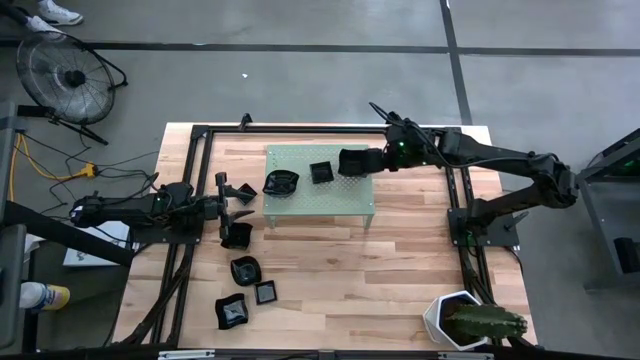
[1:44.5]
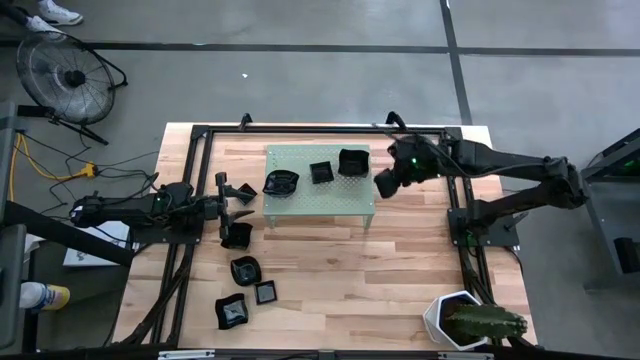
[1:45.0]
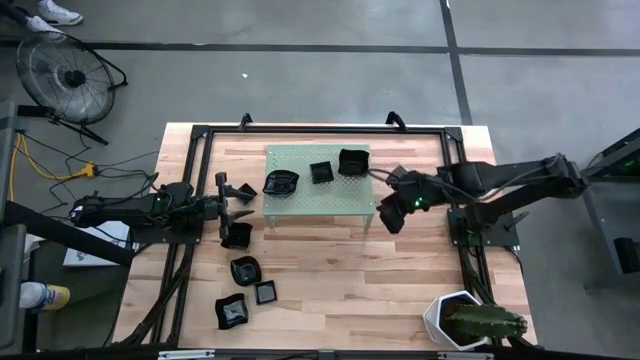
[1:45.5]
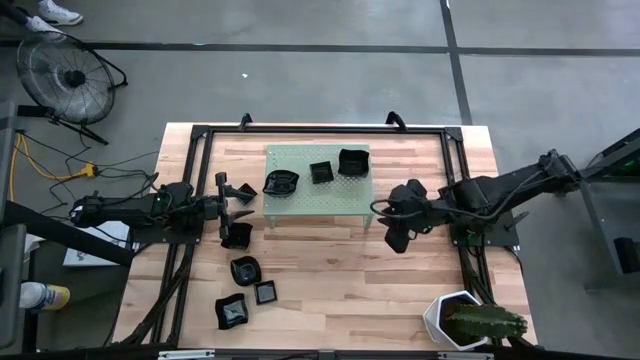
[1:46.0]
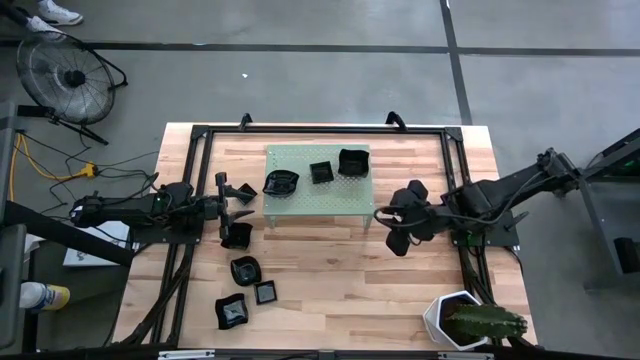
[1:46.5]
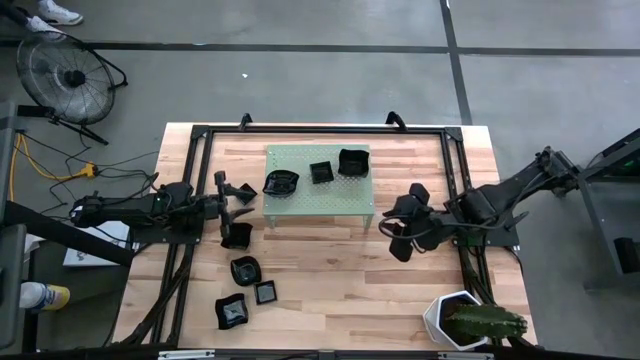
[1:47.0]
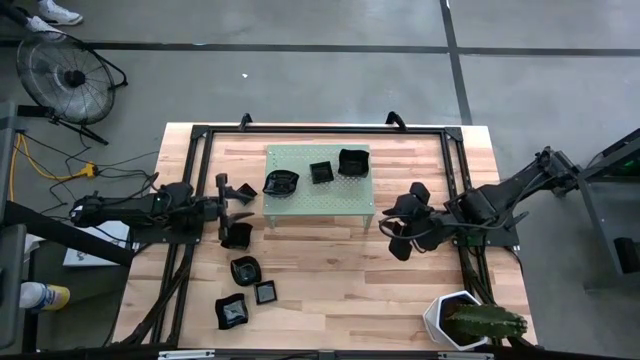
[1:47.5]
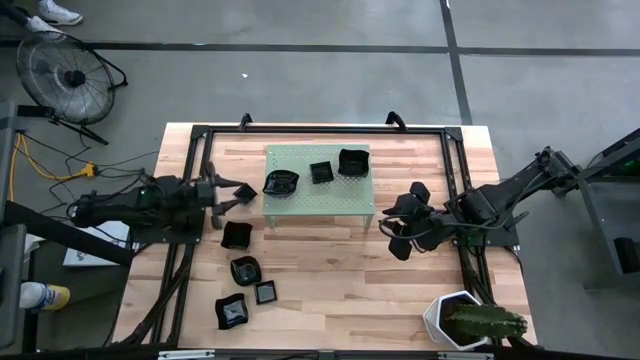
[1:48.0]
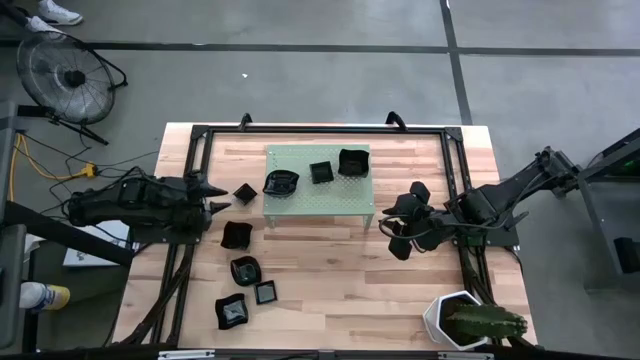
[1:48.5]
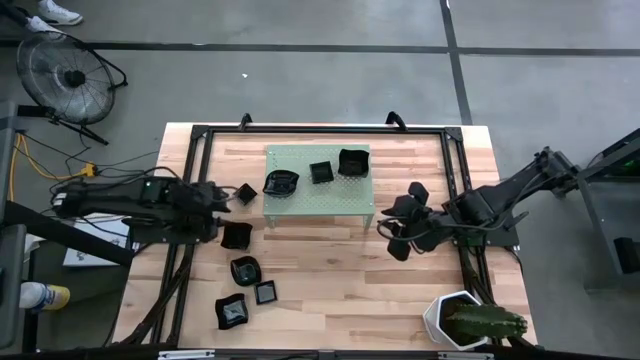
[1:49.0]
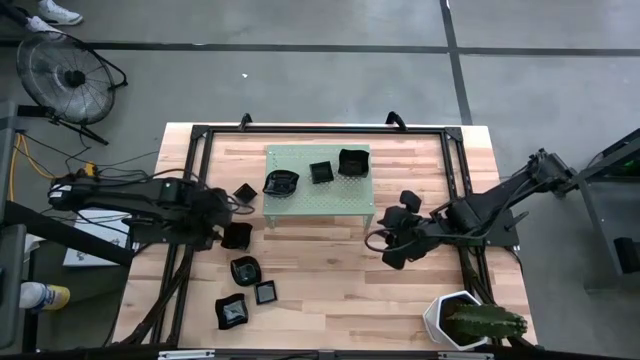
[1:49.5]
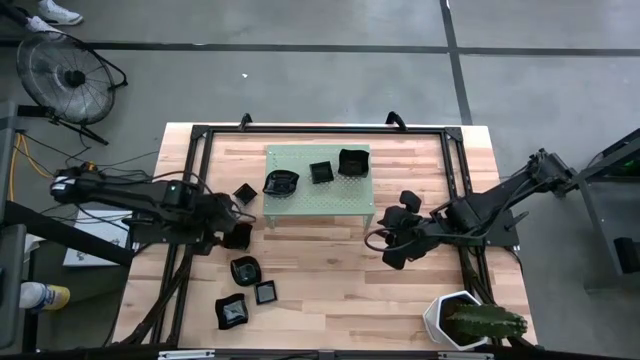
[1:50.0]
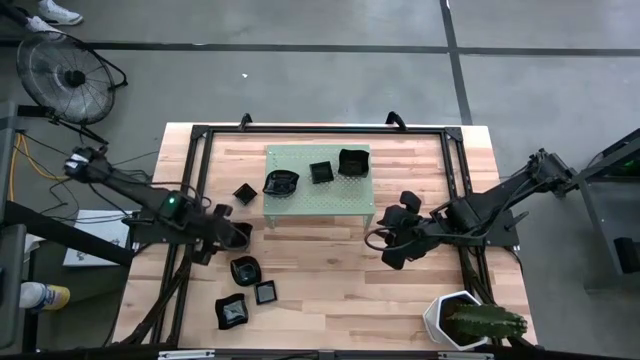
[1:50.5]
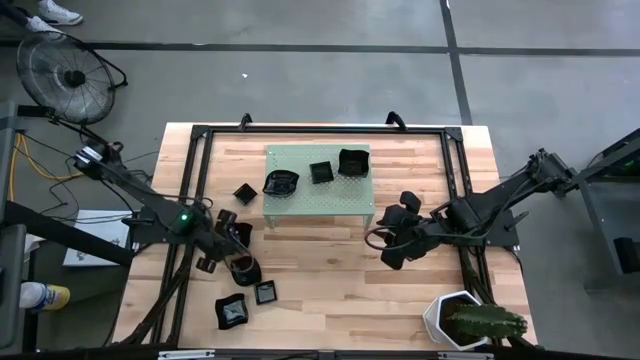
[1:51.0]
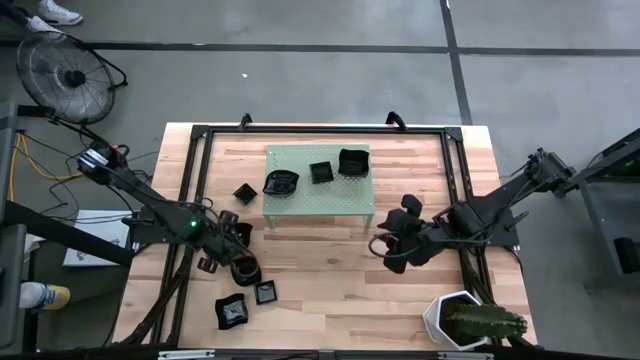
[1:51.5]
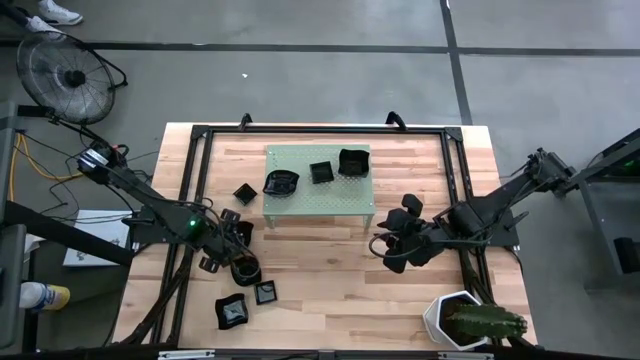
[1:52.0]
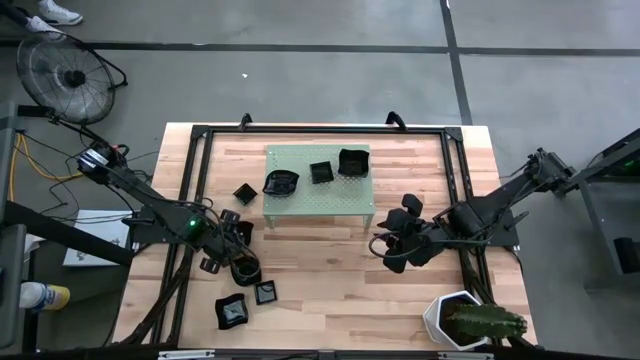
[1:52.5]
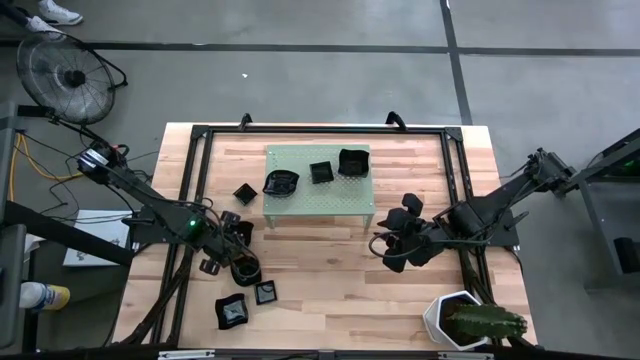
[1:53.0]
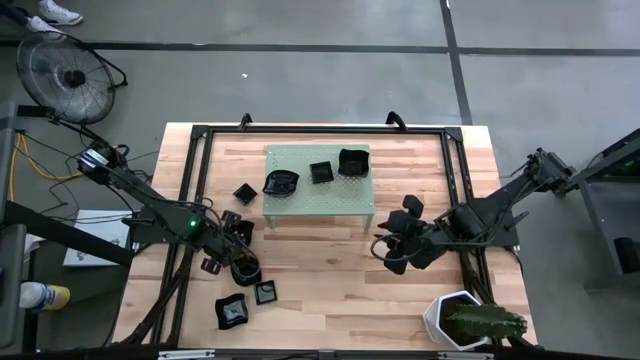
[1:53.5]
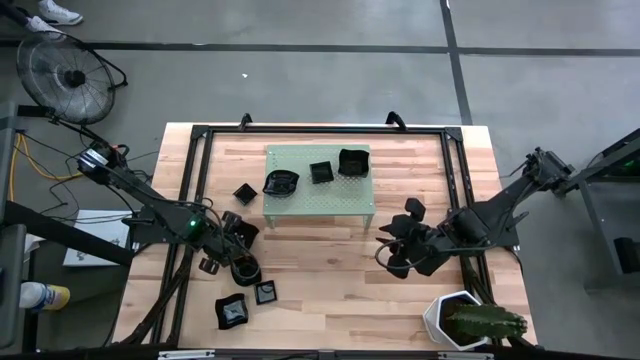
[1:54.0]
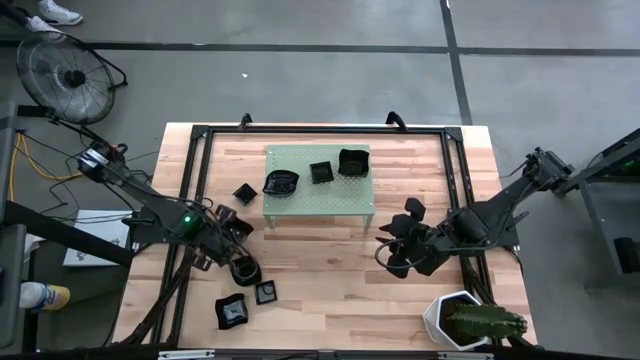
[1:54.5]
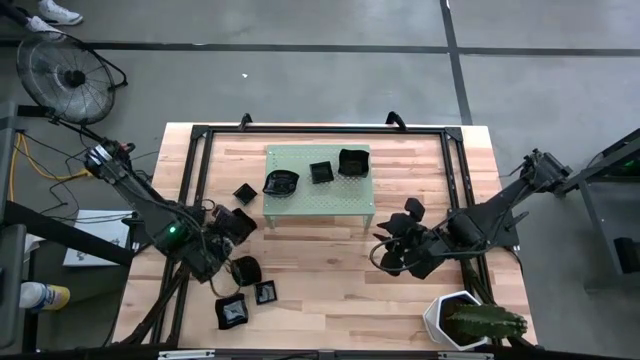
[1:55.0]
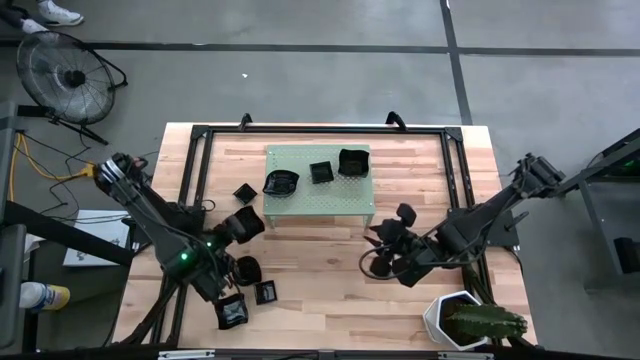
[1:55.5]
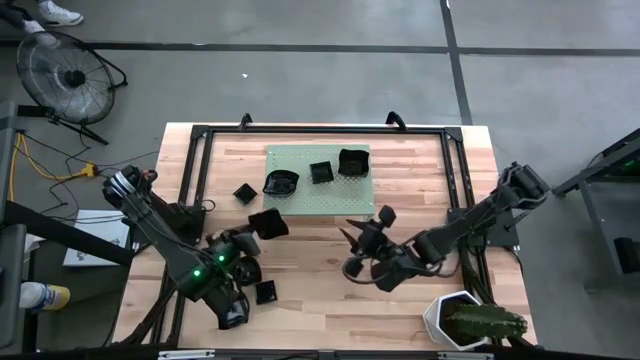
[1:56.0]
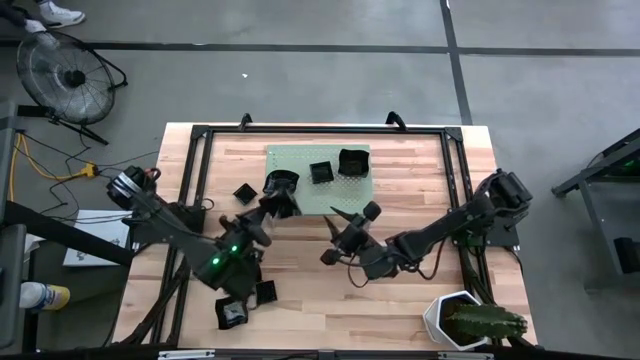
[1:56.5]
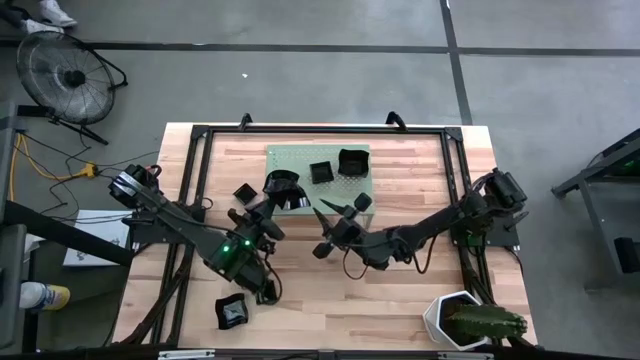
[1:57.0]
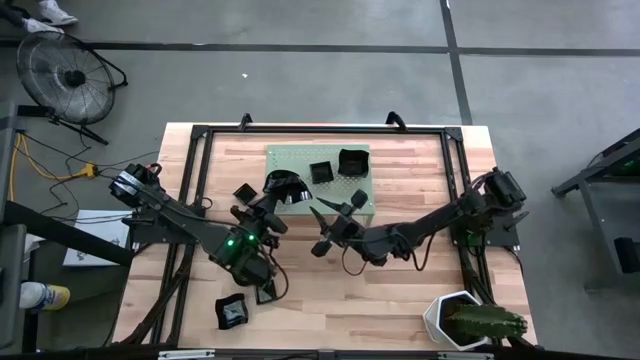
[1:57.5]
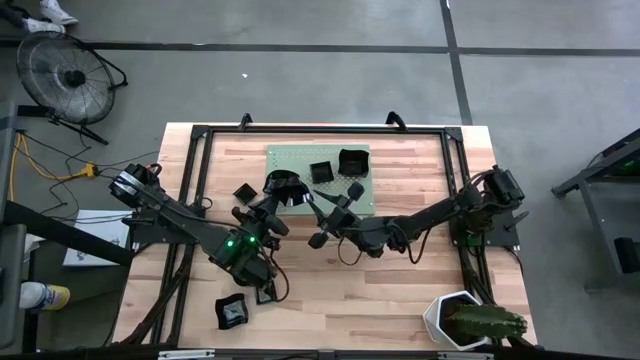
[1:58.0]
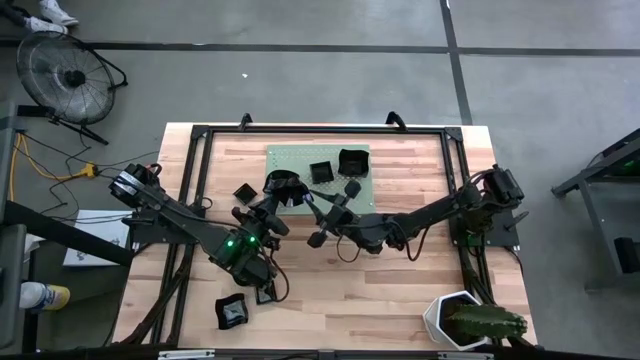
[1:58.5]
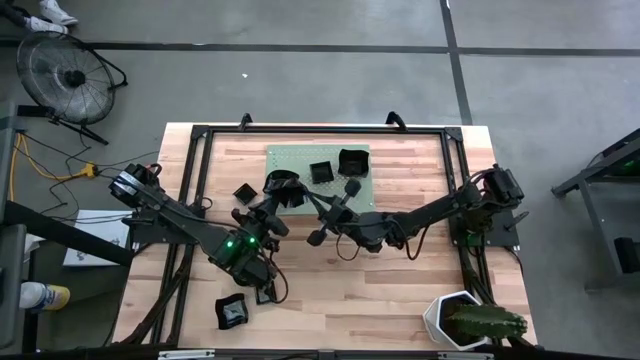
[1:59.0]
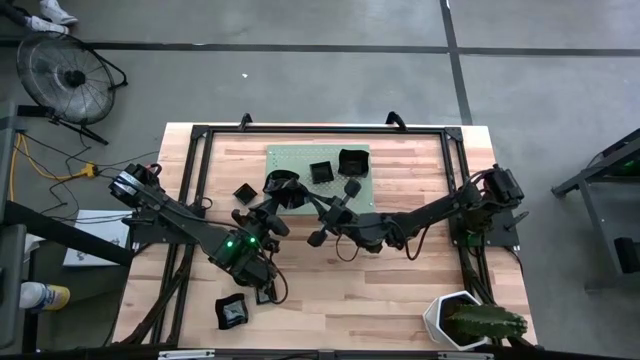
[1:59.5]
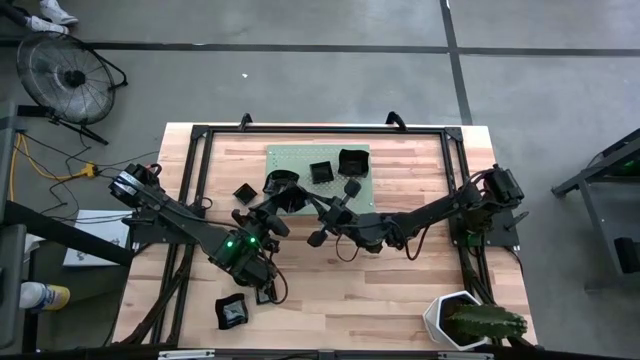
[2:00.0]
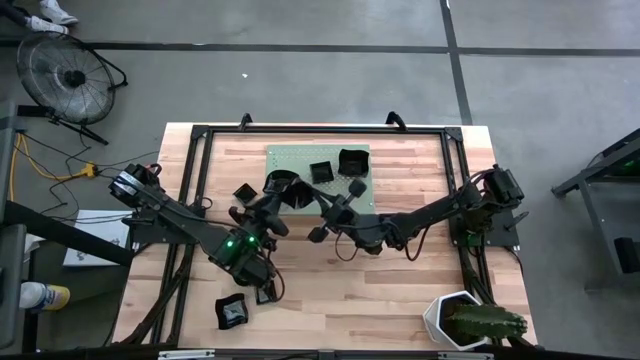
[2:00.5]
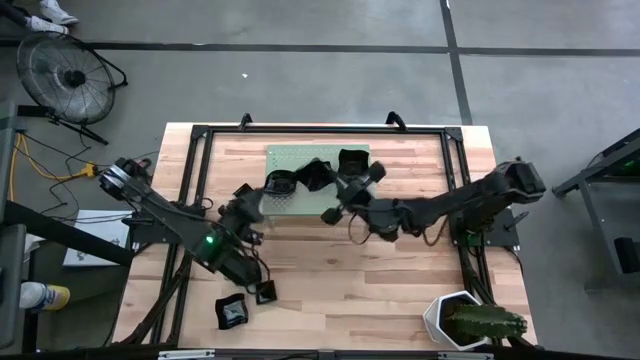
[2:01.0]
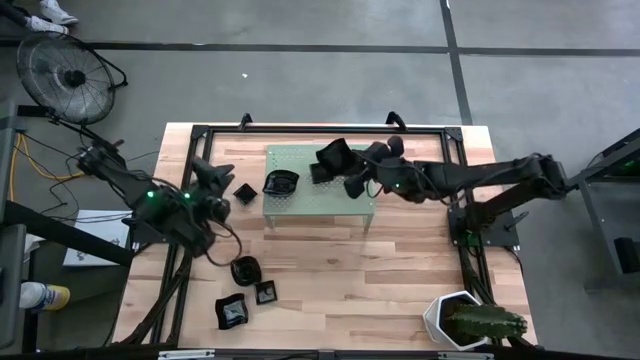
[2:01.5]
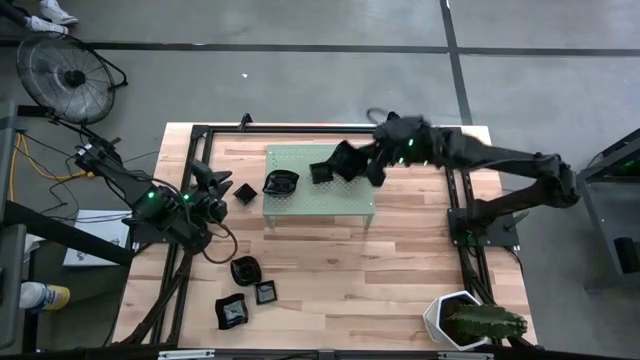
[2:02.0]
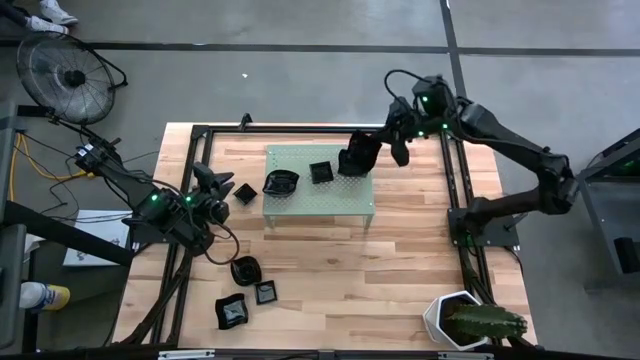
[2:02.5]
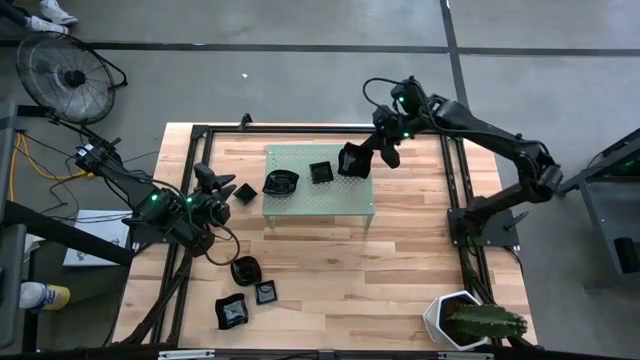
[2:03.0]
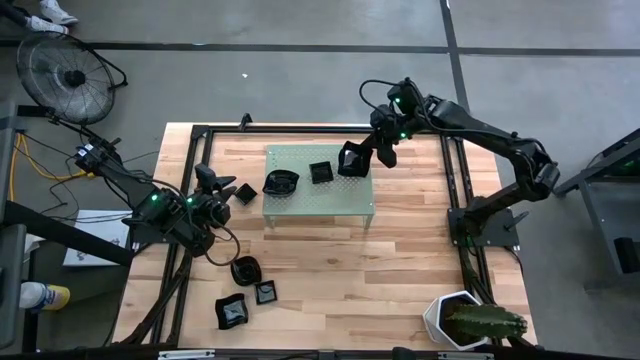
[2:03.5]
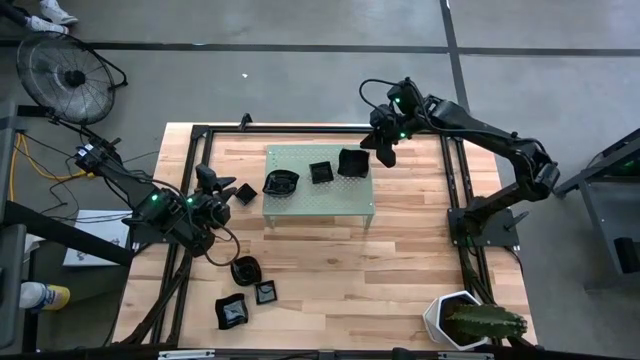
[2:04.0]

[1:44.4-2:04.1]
Task: Pick & Place Mini shaped plates
Stack the distorted square plate on top of the other distorted square plates on the shelf

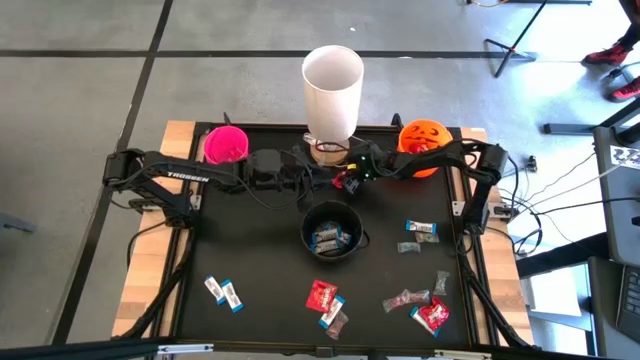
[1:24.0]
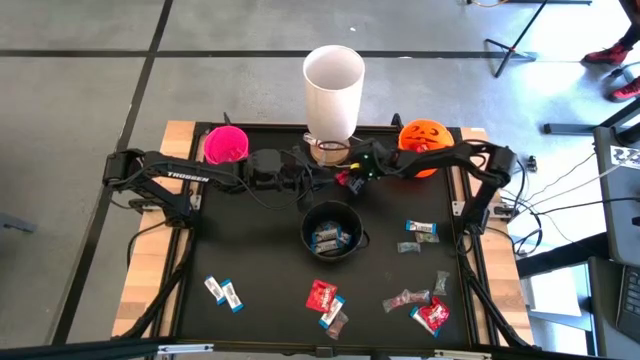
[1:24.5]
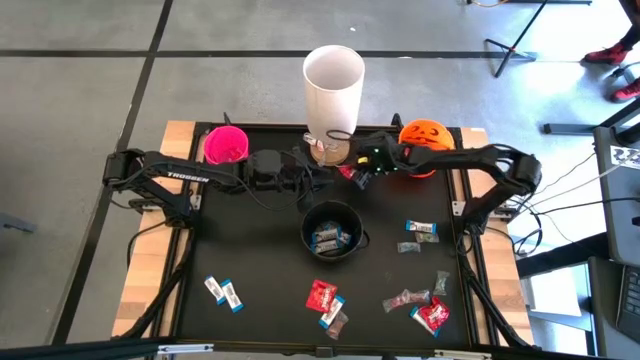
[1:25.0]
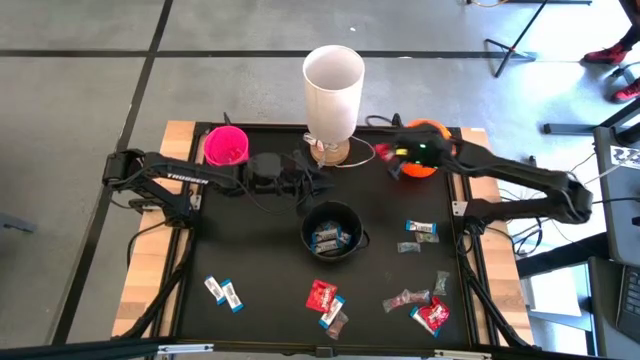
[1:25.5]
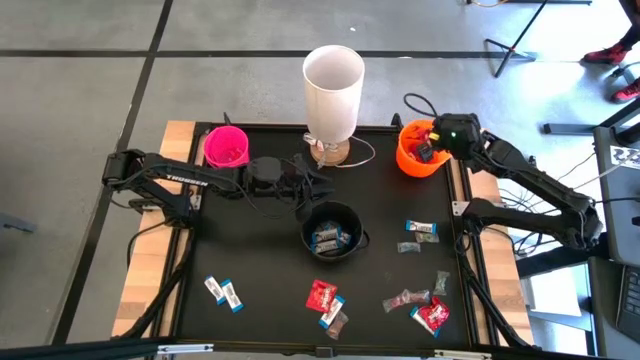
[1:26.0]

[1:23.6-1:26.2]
Task: Sort candy
Put the red candy pack into the orange bucket
